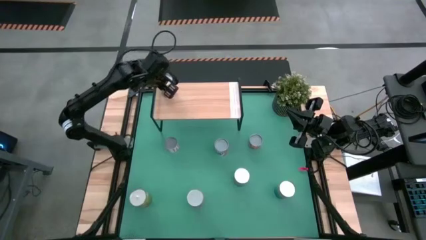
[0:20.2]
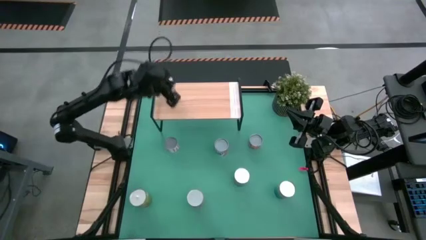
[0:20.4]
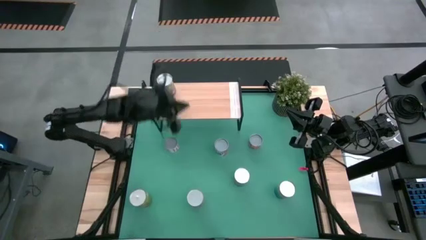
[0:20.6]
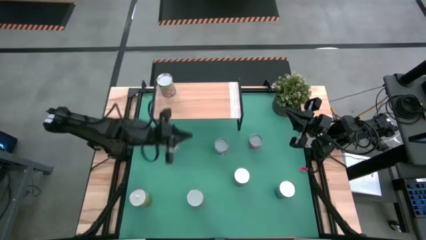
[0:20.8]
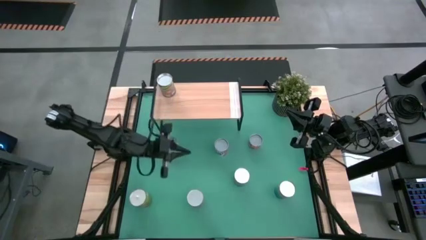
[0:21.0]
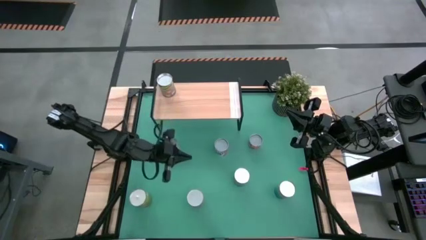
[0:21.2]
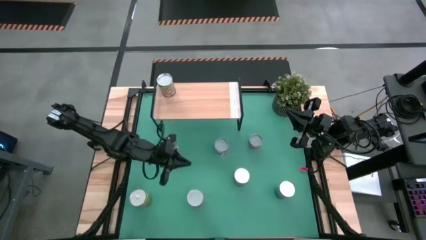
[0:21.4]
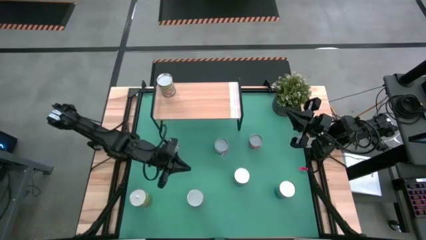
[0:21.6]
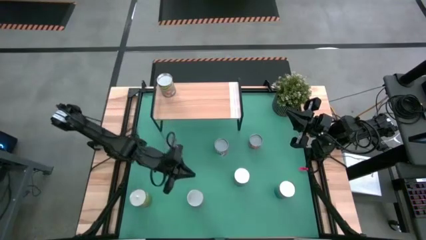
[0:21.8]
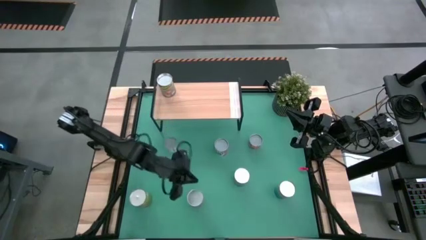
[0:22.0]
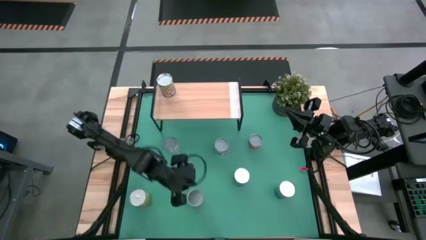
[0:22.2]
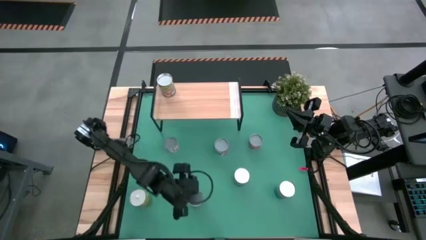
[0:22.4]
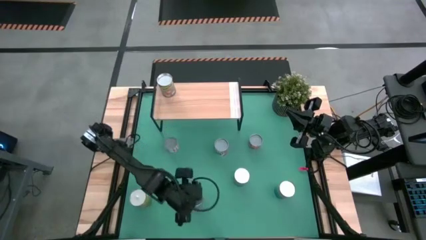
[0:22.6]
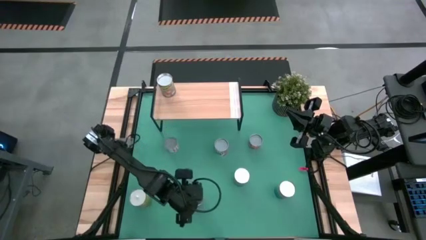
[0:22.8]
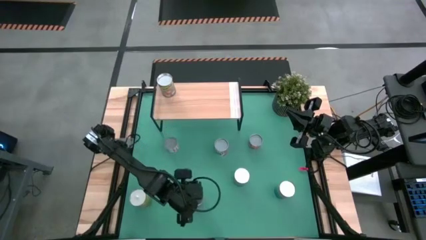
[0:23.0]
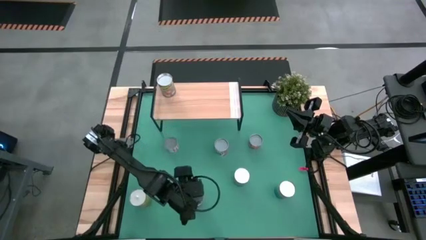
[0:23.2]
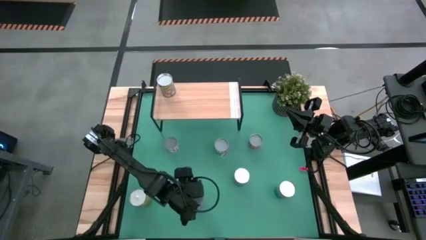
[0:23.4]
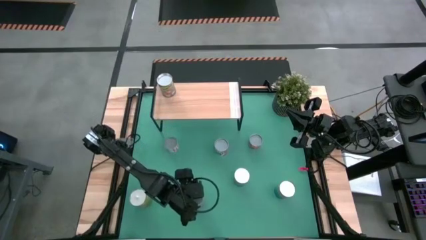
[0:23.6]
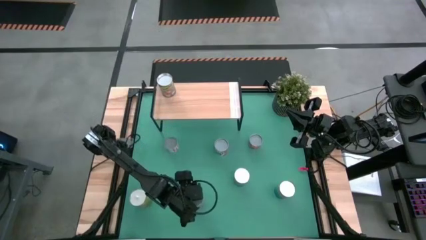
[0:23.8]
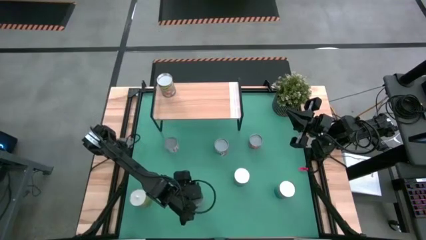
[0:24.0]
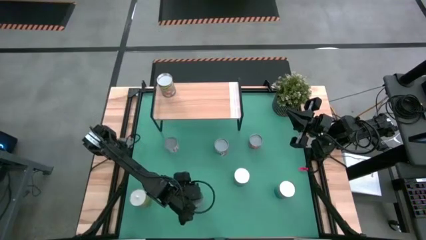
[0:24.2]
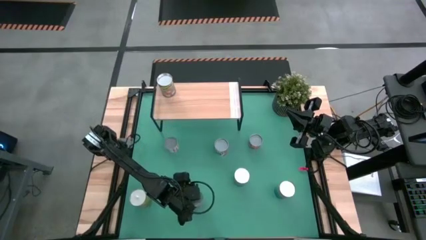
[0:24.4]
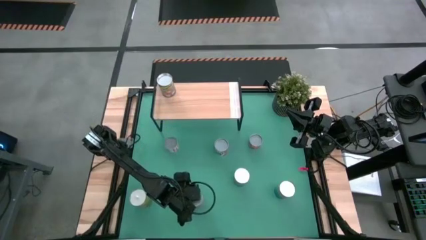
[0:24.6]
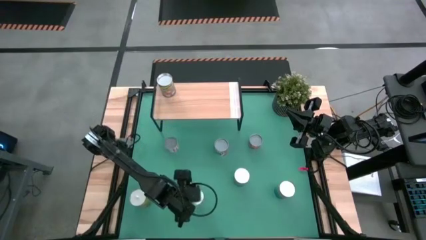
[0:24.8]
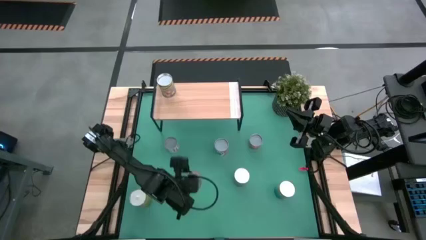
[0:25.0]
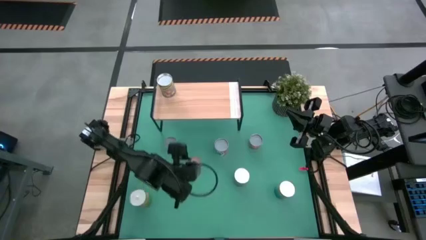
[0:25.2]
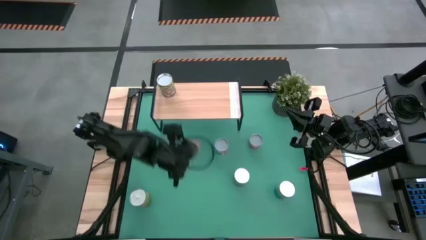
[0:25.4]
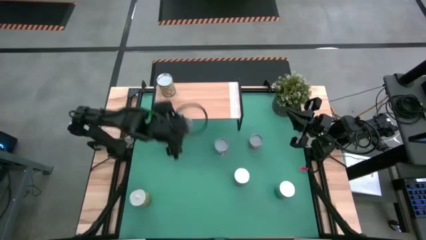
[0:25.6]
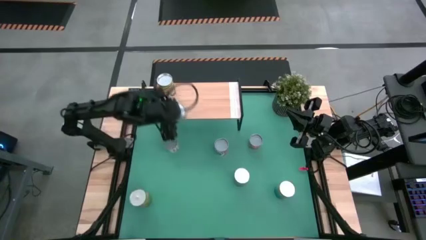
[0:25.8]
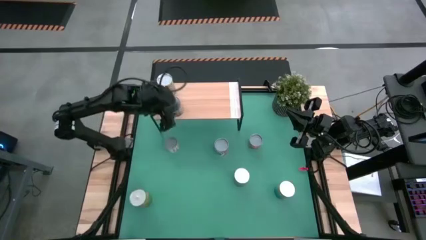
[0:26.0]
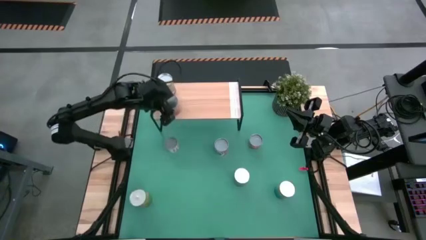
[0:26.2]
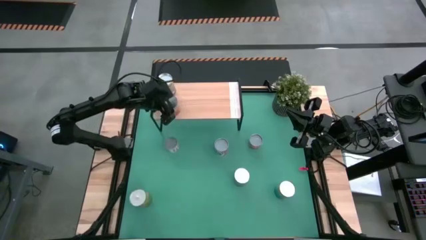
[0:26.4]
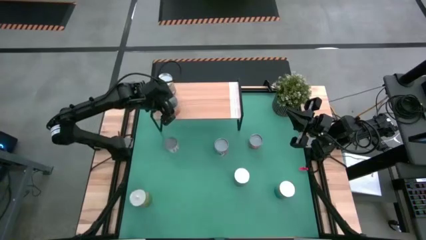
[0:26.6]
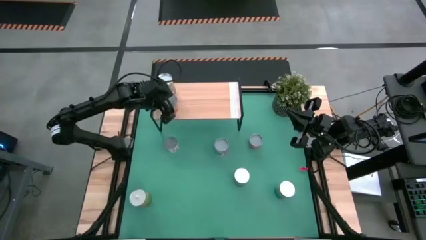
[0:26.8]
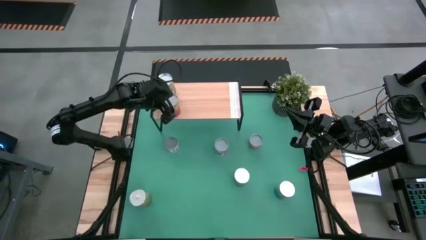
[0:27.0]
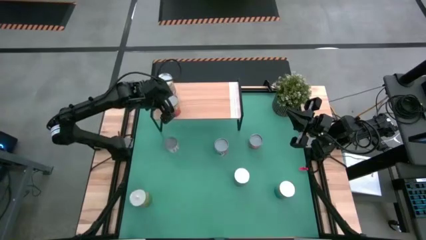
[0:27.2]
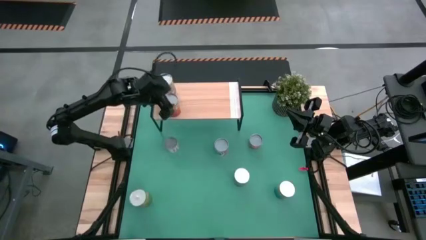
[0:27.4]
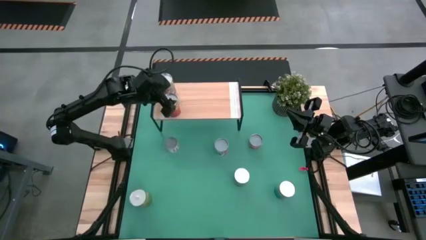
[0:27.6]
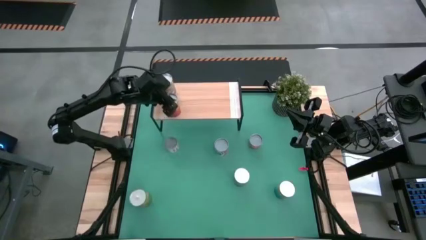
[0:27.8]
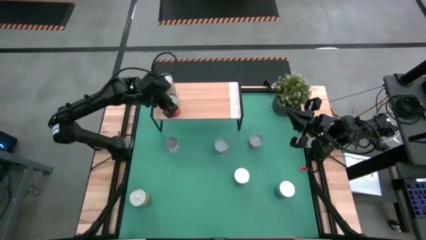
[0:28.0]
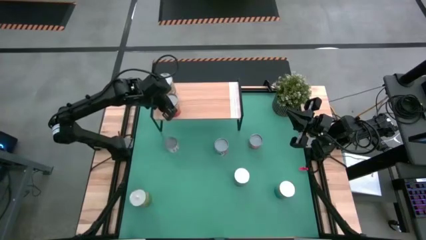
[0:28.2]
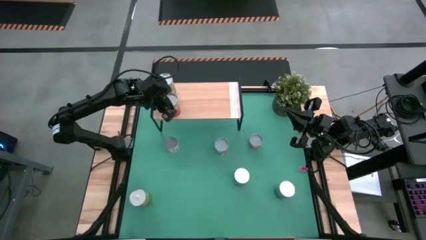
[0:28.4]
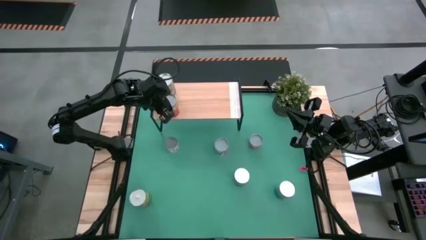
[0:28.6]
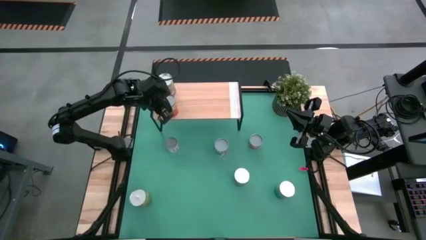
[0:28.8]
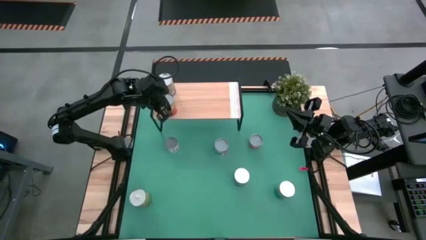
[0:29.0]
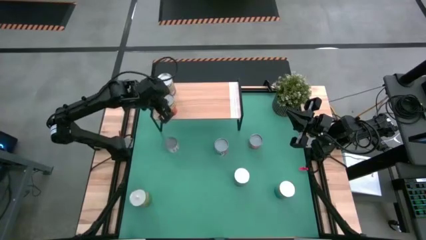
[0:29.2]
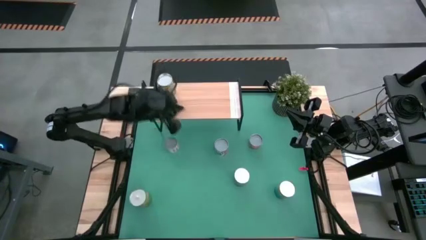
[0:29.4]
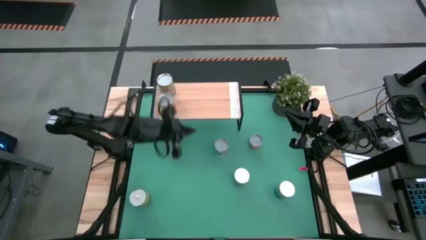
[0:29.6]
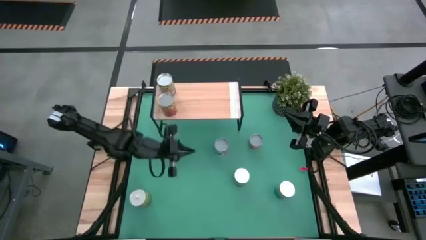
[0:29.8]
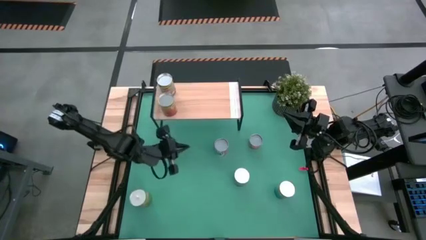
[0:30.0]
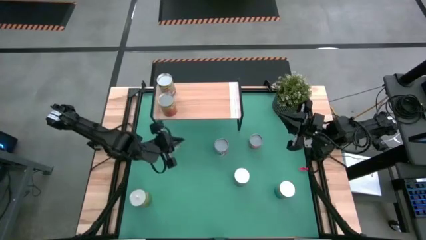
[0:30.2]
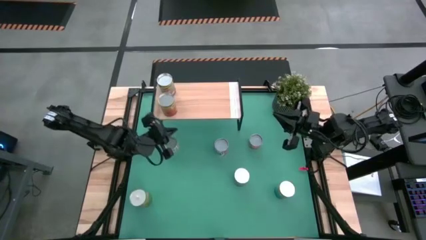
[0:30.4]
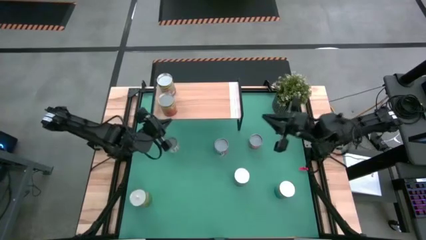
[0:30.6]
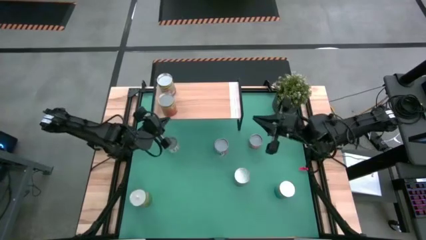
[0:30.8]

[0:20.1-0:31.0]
Task: Pick and place cans onto a shelf
Put the canned pineapple on the shelf
